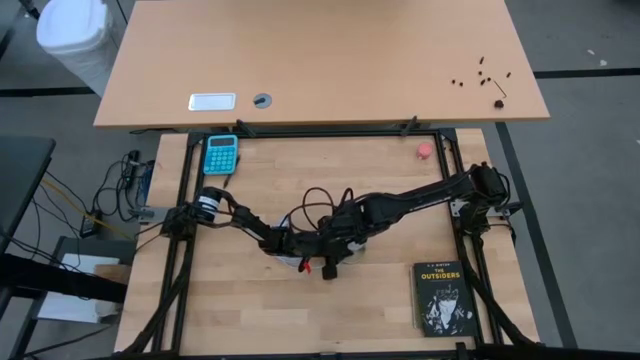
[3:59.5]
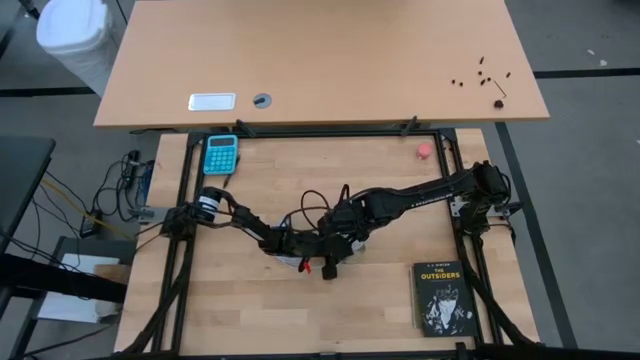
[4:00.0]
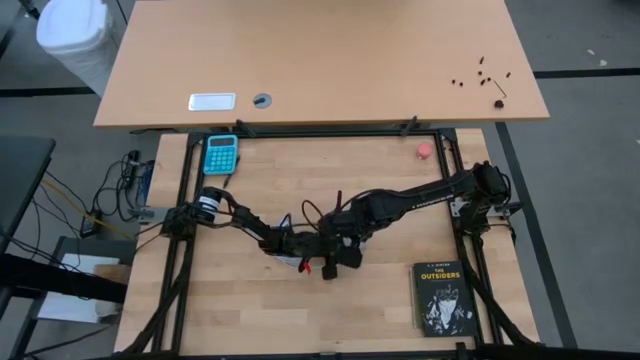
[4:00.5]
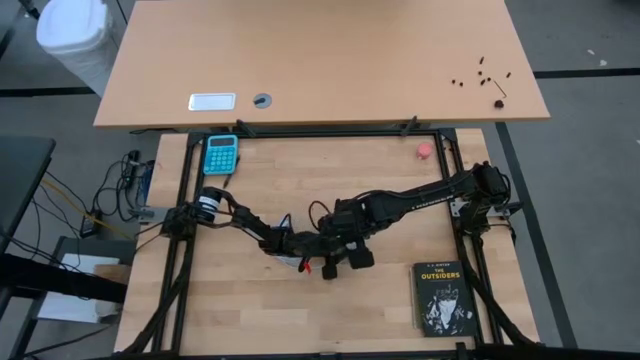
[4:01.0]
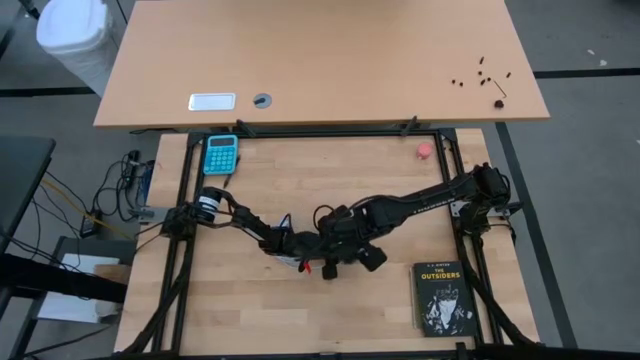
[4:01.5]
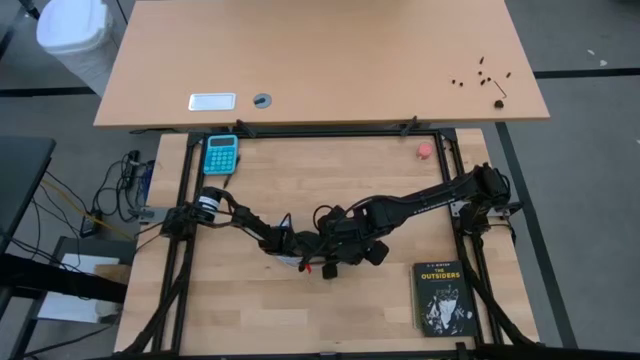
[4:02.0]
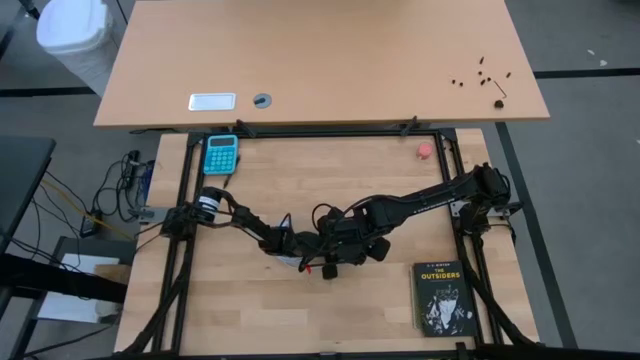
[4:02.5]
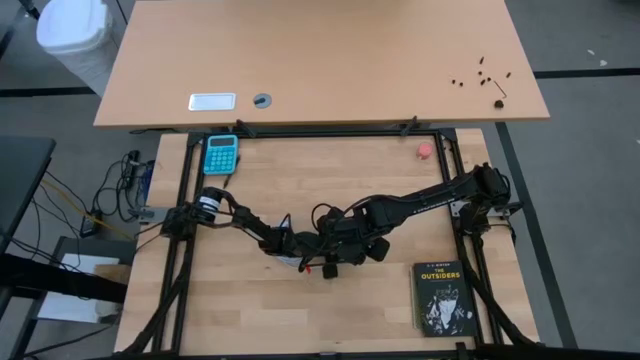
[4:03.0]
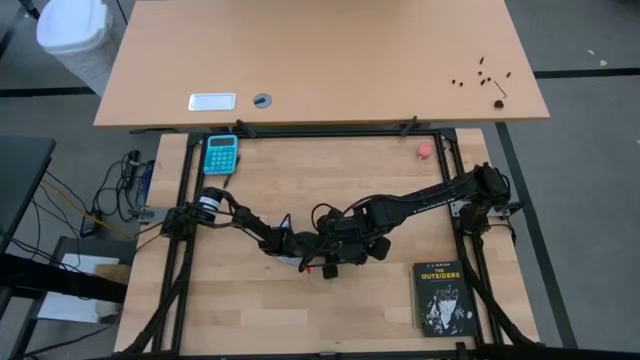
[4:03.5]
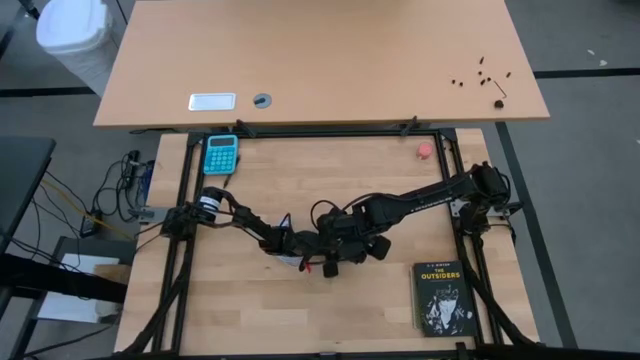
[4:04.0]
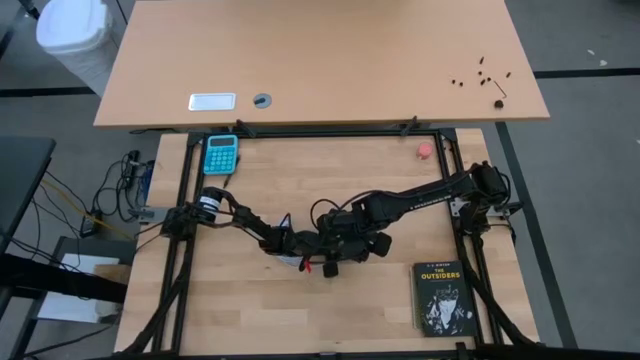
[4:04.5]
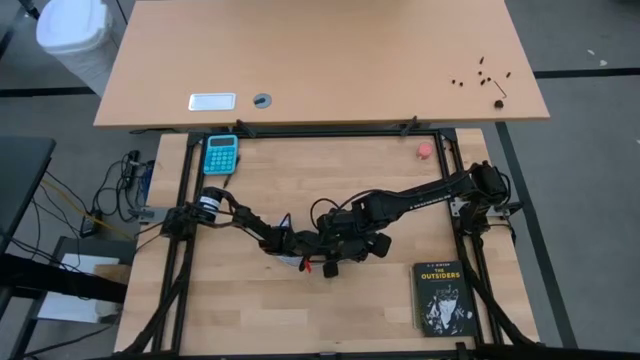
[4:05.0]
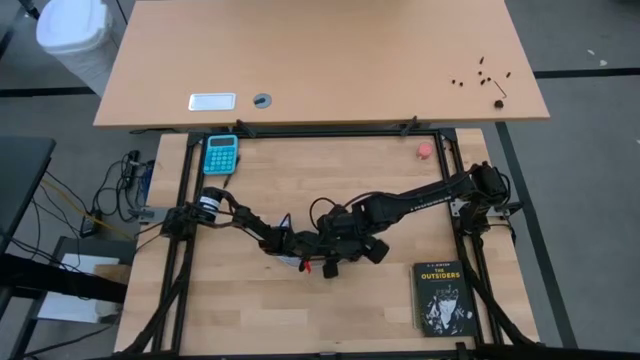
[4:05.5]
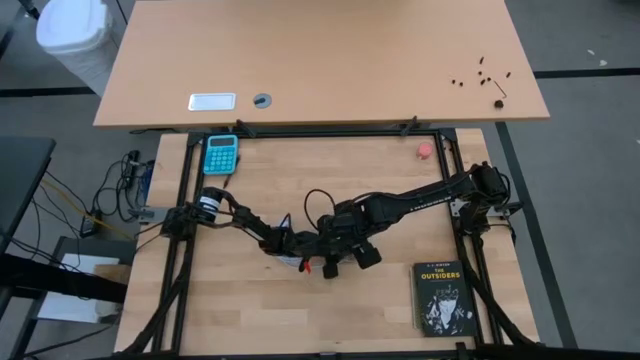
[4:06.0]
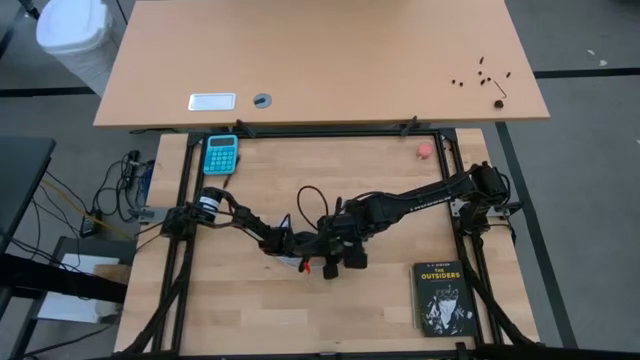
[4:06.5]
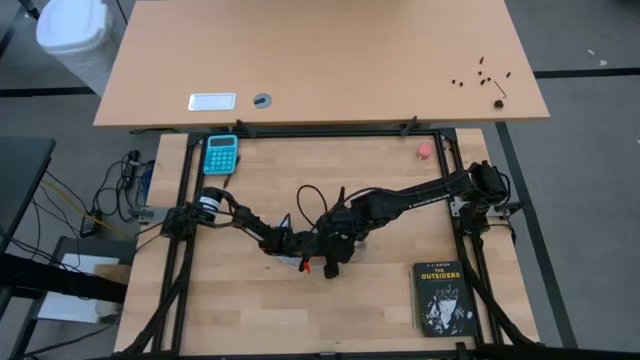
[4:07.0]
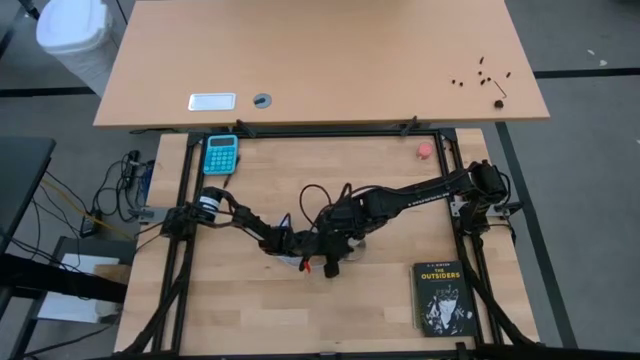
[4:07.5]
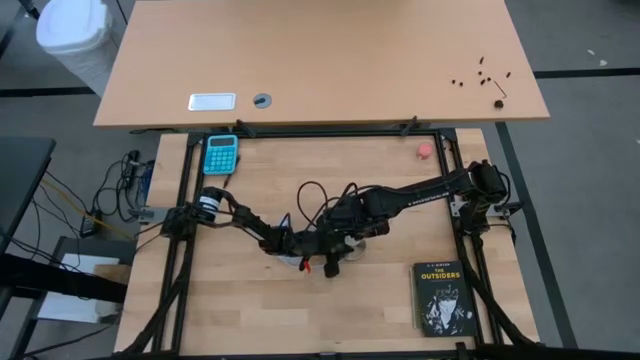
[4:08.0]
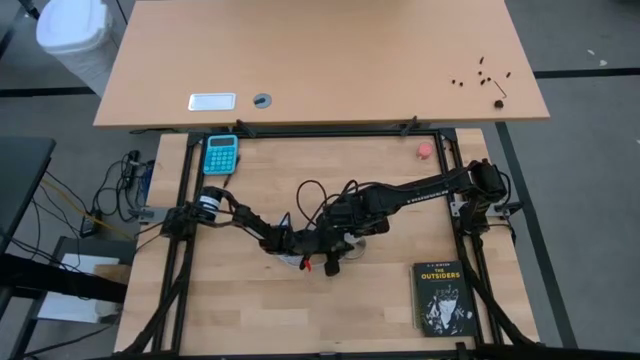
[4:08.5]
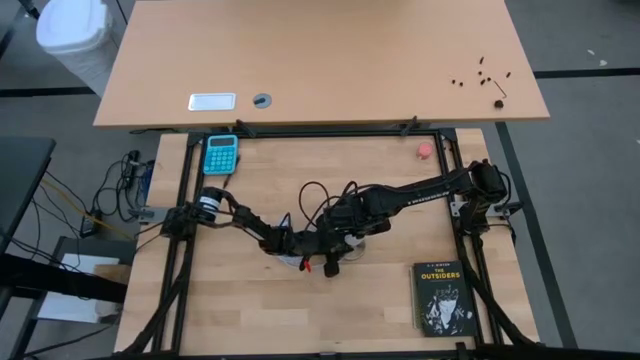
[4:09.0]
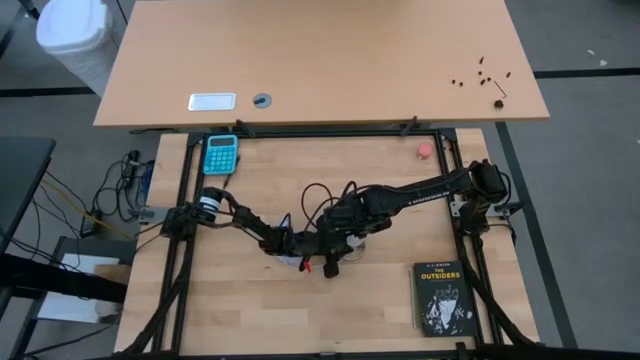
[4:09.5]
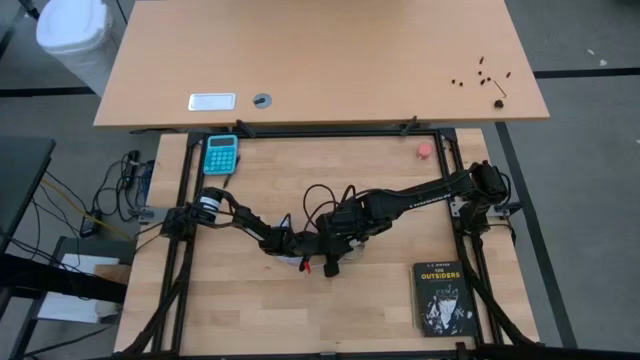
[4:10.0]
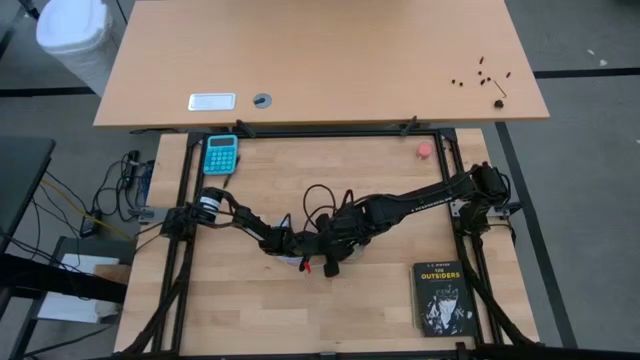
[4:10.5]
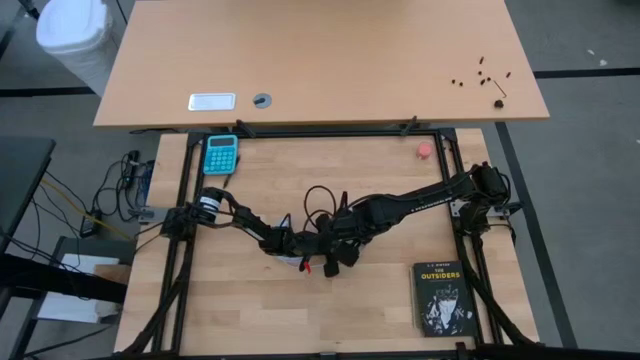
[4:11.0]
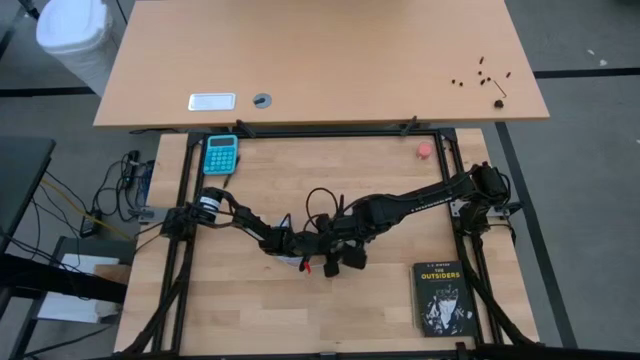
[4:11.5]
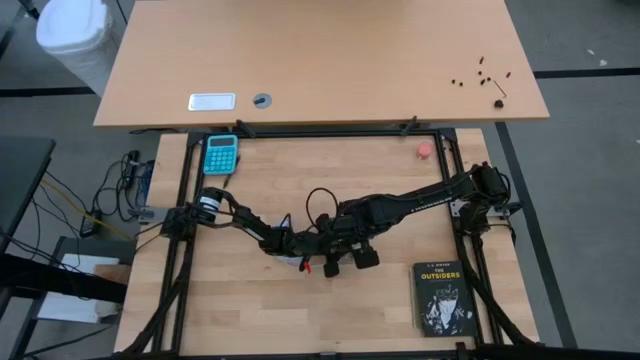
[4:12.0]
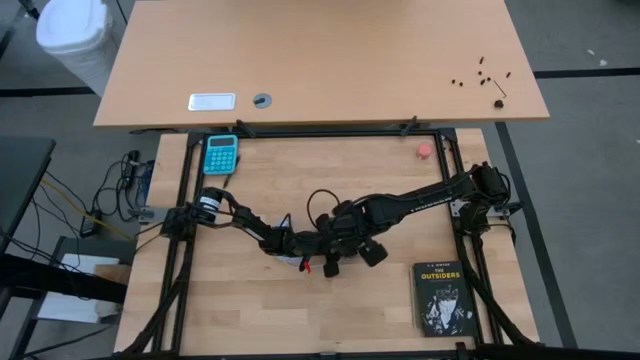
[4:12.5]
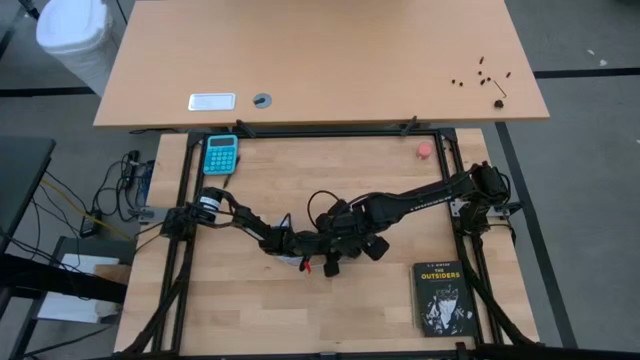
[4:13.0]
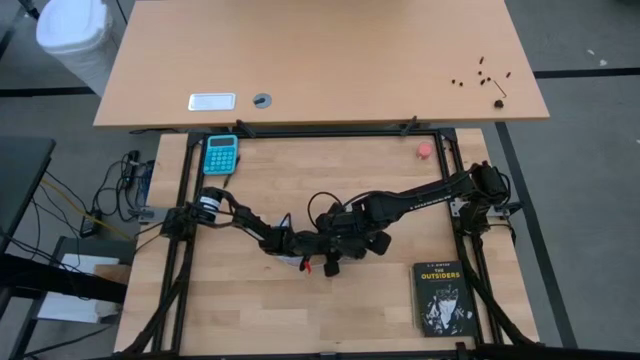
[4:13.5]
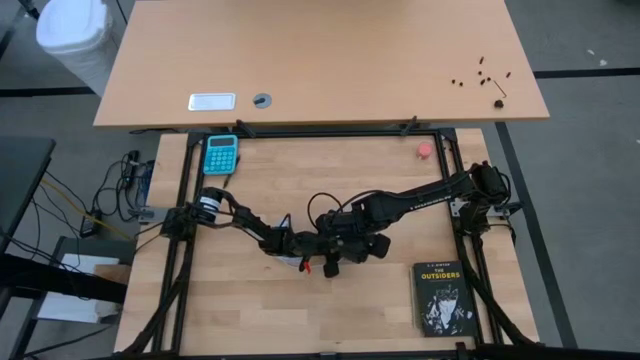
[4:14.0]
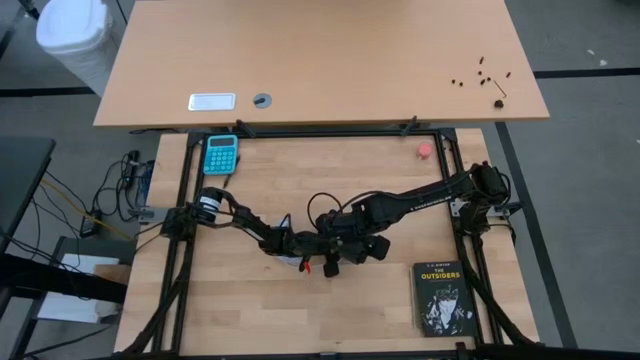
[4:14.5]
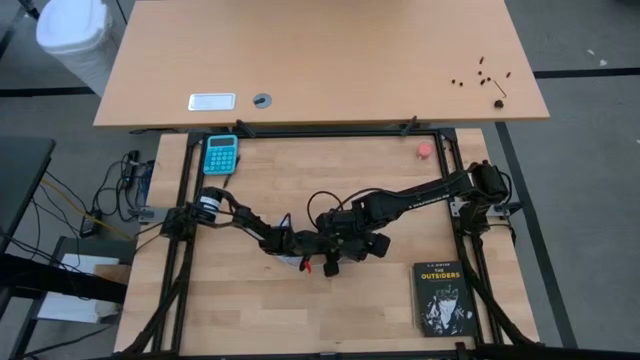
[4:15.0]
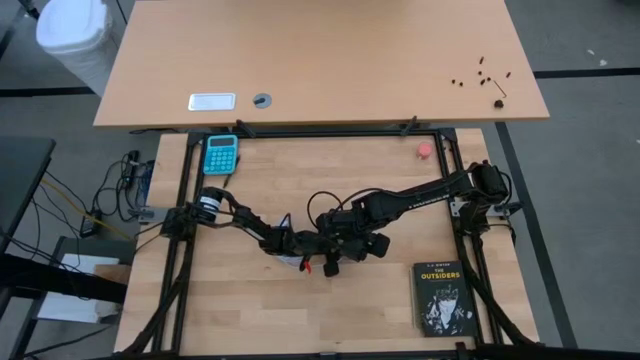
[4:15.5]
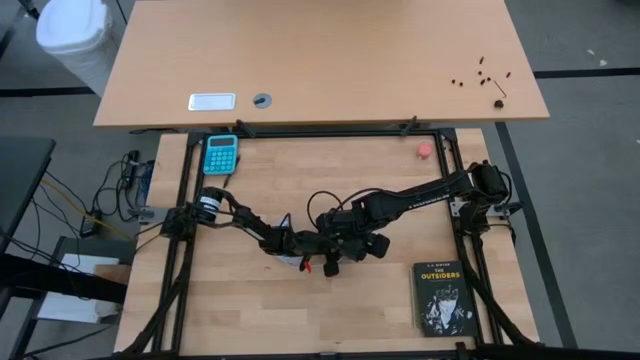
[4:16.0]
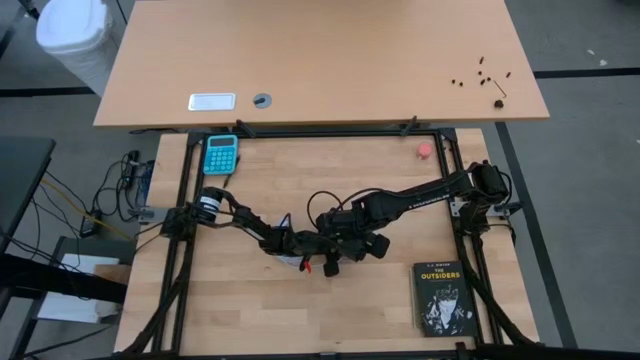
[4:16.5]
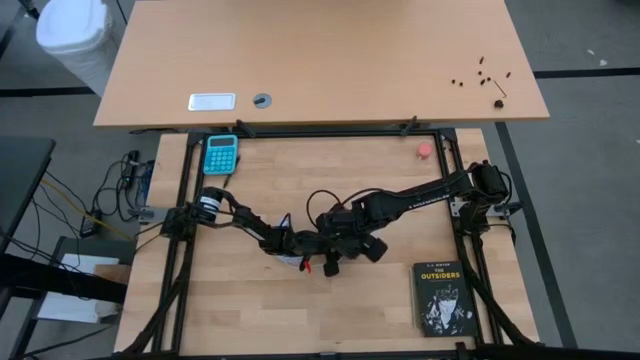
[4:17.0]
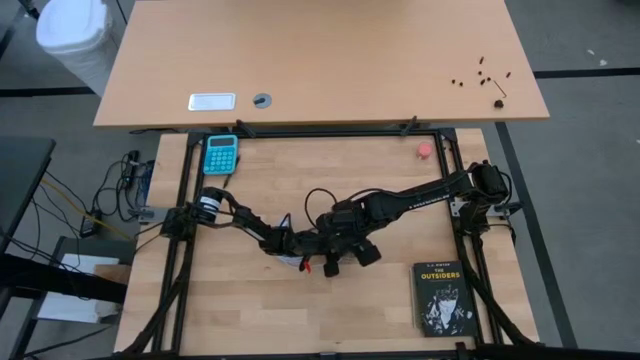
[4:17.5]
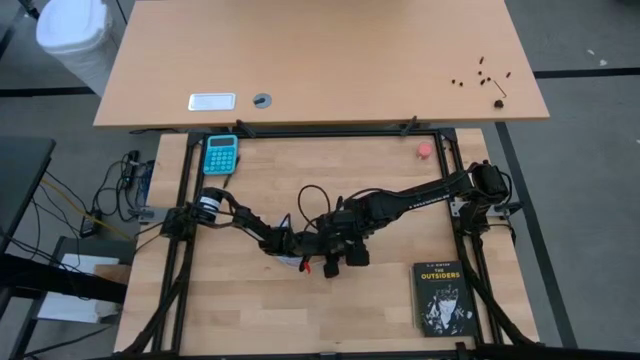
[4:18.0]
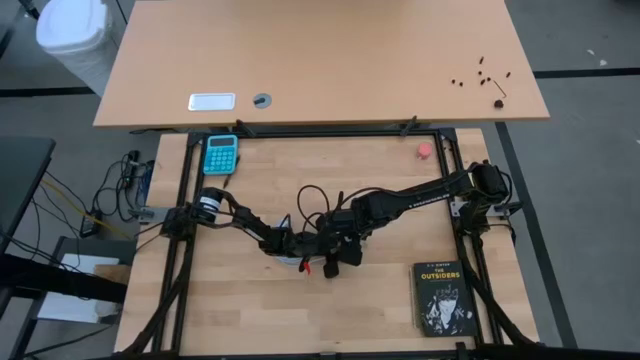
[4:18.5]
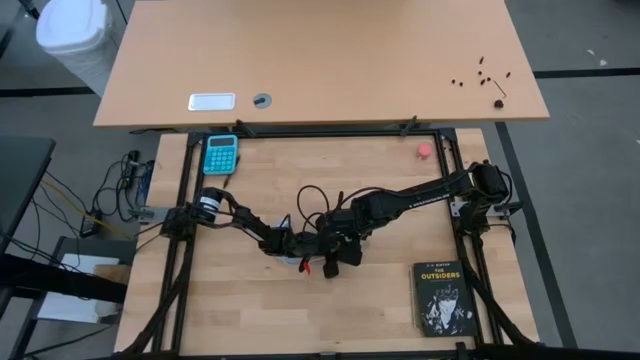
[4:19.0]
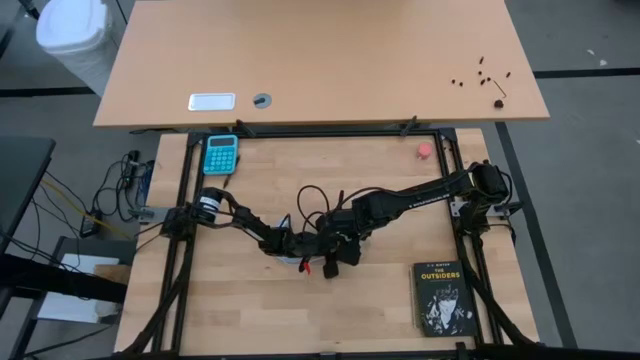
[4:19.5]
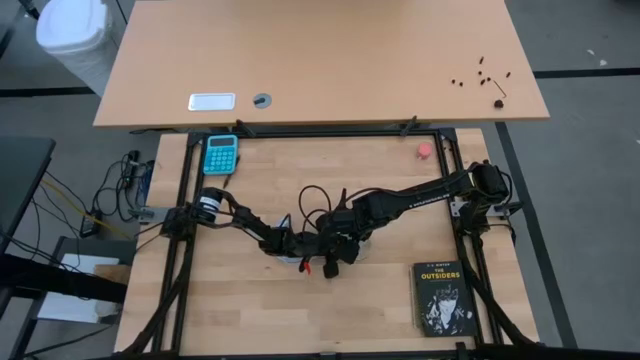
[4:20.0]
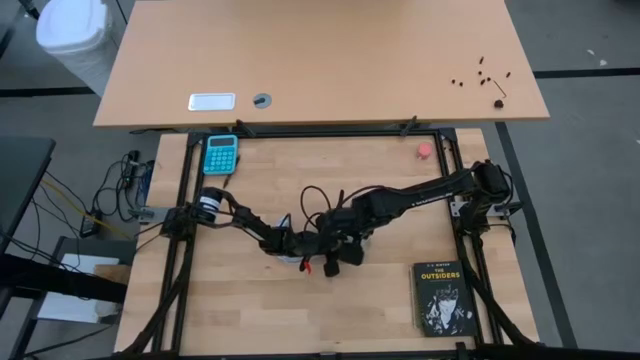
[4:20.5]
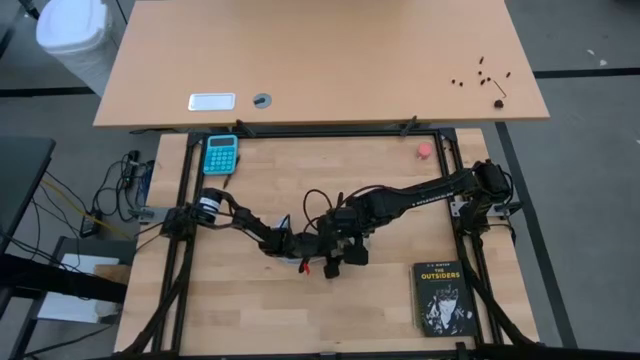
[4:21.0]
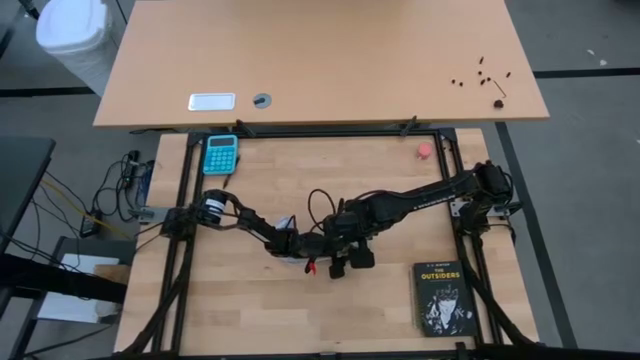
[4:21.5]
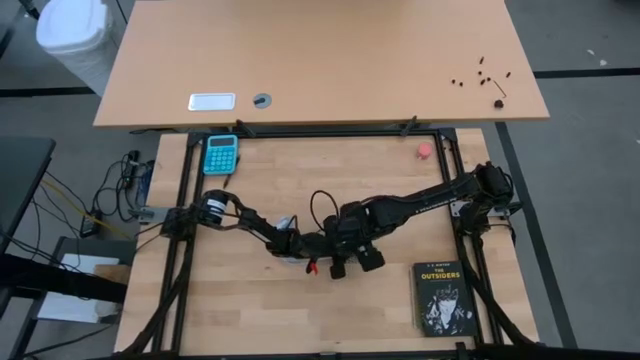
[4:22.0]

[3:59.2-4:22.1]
Task: Screw lightbulb
Insert the lightbulb into the lamp
